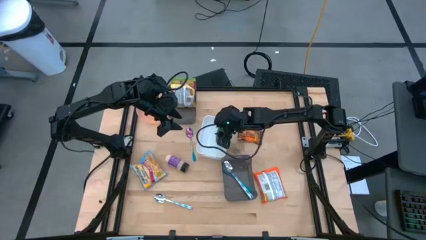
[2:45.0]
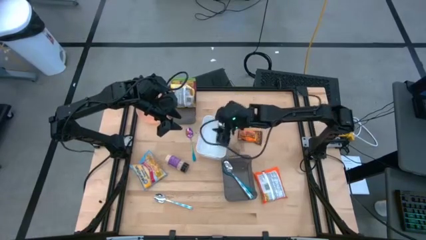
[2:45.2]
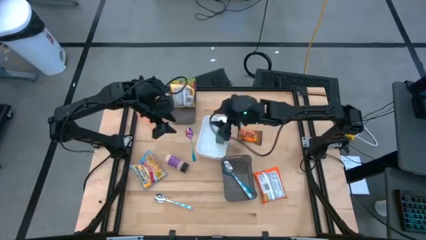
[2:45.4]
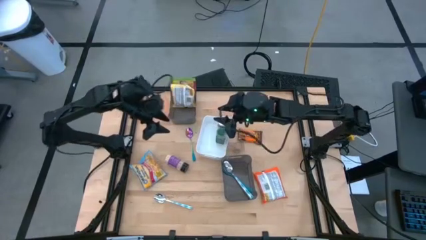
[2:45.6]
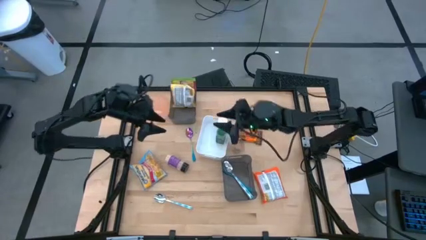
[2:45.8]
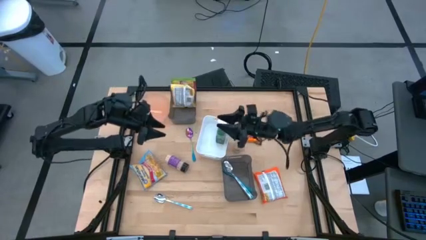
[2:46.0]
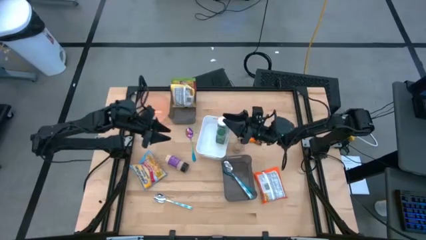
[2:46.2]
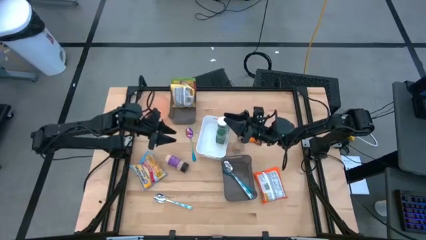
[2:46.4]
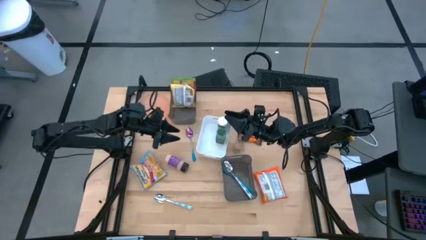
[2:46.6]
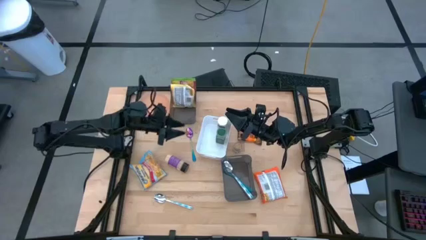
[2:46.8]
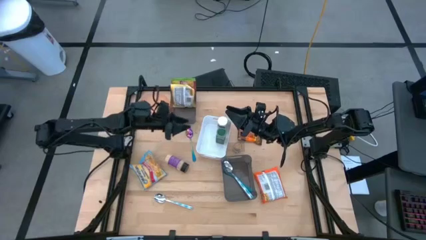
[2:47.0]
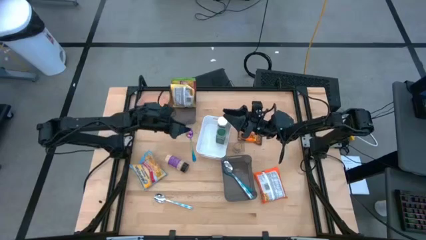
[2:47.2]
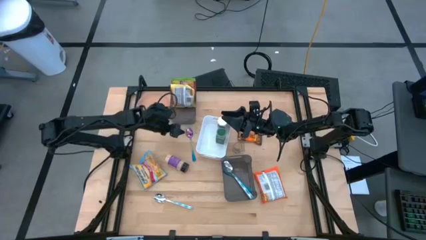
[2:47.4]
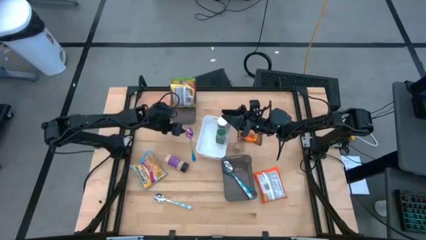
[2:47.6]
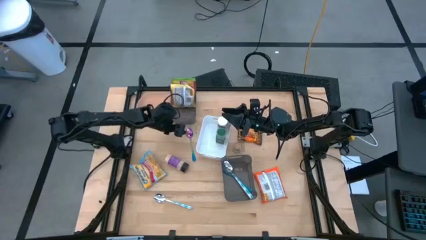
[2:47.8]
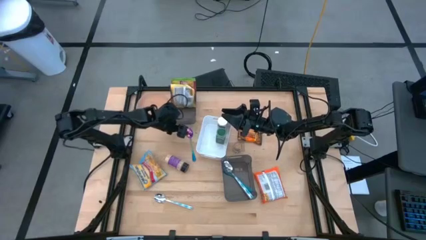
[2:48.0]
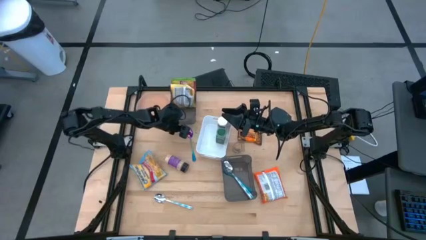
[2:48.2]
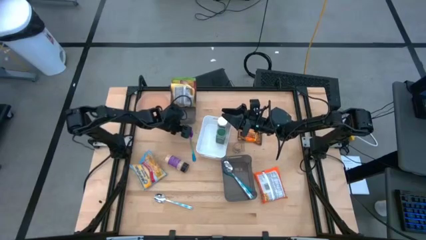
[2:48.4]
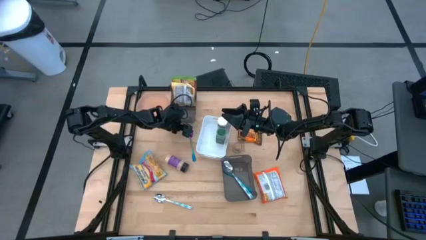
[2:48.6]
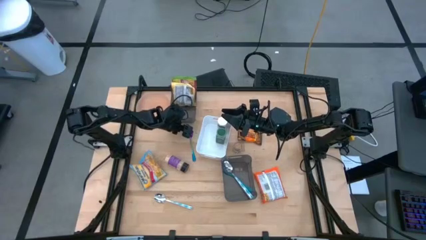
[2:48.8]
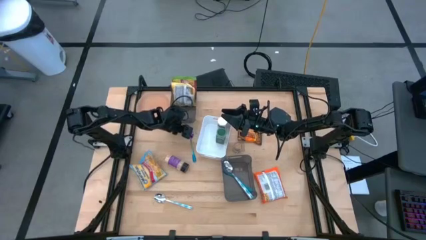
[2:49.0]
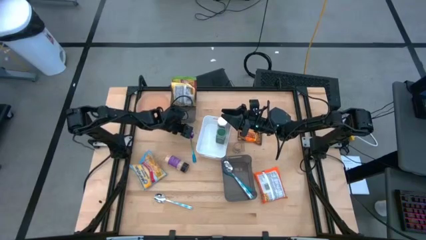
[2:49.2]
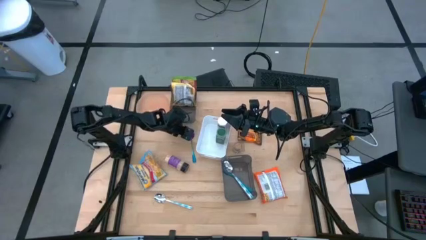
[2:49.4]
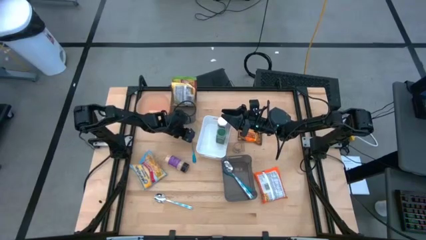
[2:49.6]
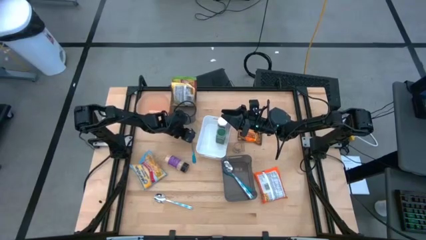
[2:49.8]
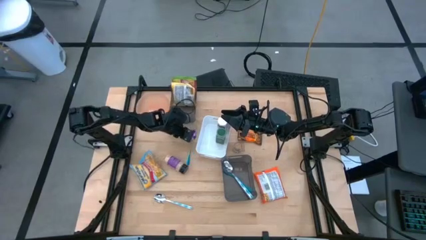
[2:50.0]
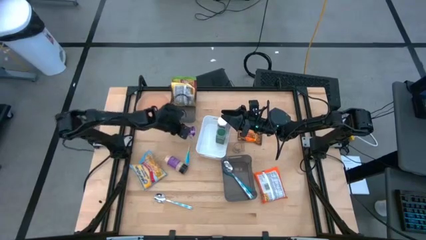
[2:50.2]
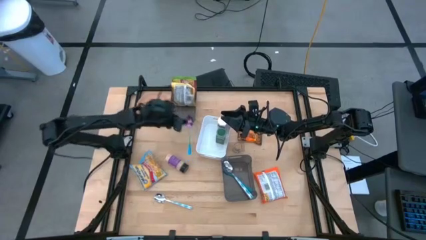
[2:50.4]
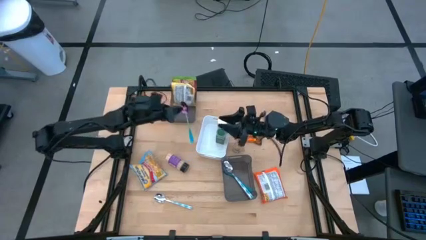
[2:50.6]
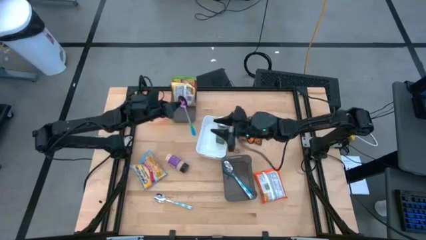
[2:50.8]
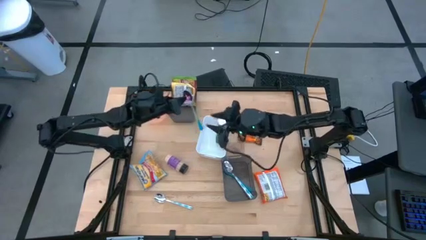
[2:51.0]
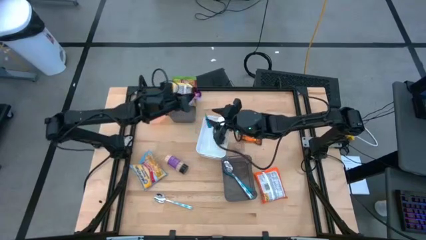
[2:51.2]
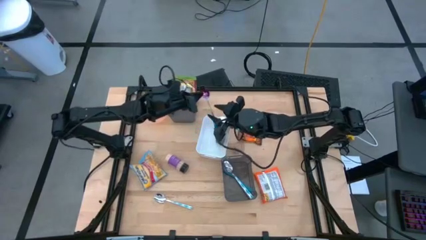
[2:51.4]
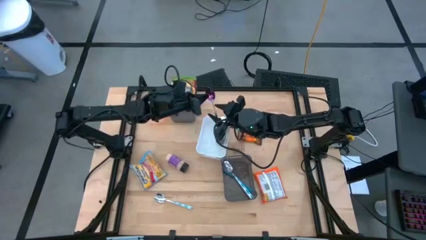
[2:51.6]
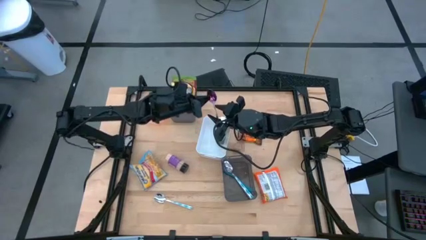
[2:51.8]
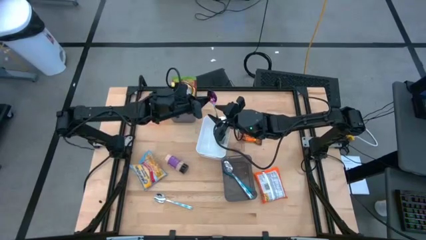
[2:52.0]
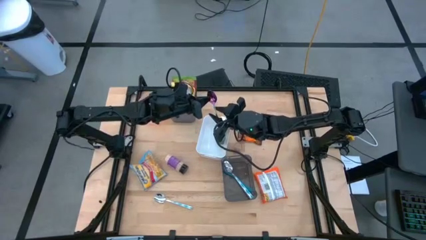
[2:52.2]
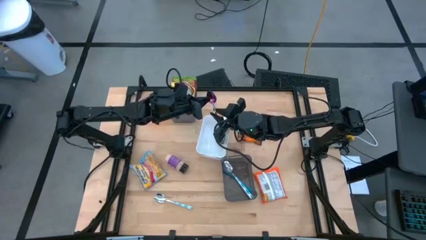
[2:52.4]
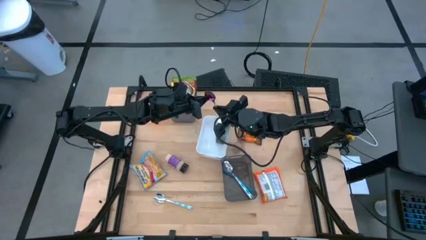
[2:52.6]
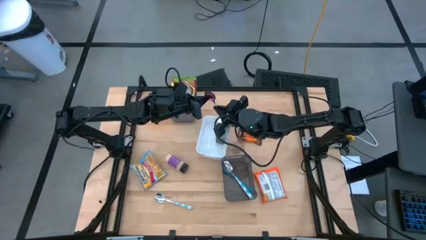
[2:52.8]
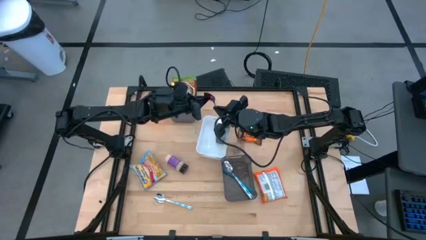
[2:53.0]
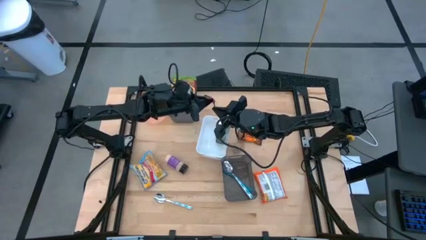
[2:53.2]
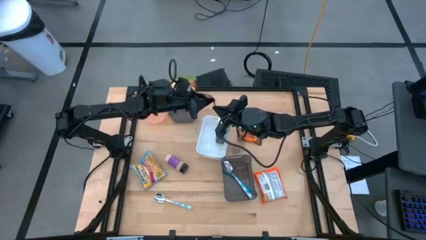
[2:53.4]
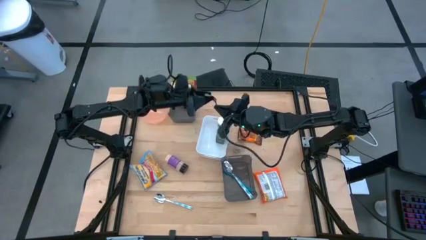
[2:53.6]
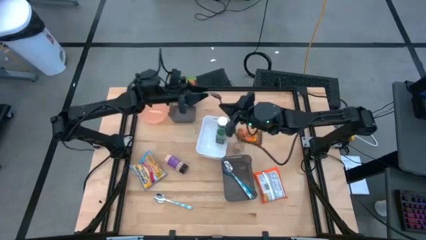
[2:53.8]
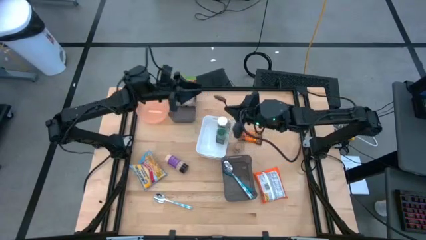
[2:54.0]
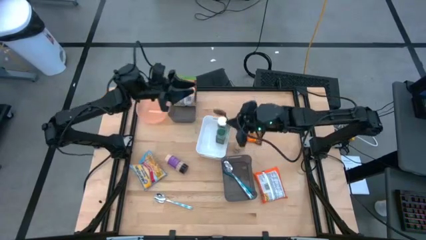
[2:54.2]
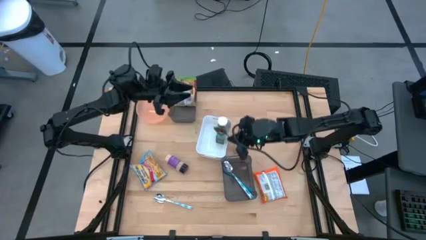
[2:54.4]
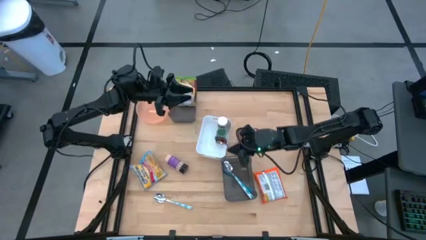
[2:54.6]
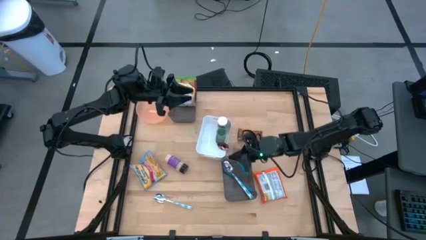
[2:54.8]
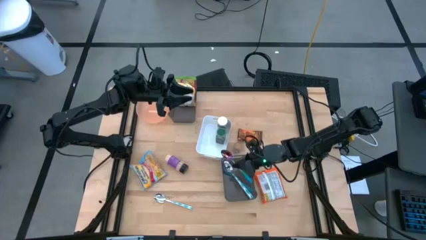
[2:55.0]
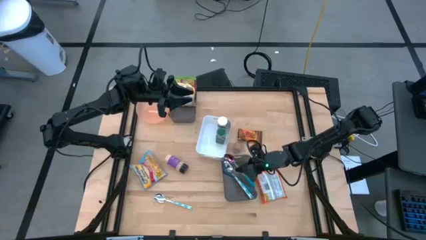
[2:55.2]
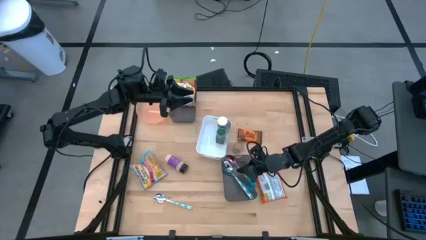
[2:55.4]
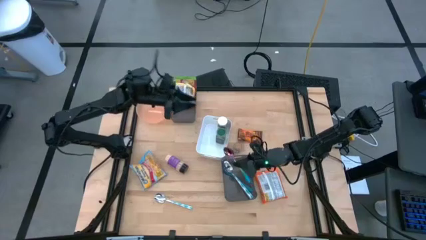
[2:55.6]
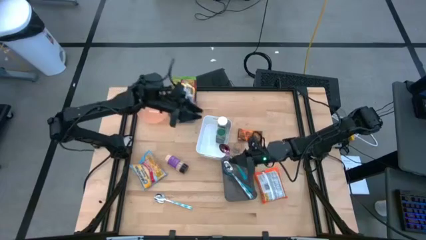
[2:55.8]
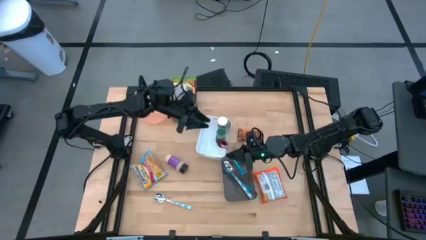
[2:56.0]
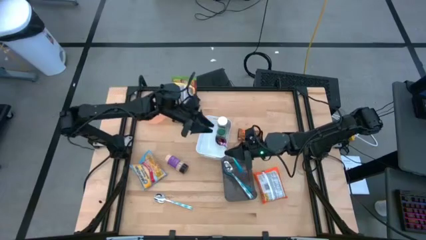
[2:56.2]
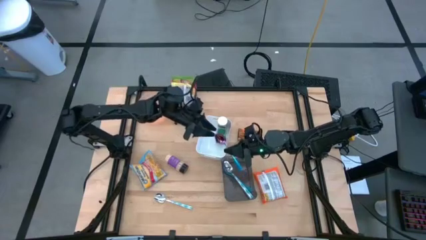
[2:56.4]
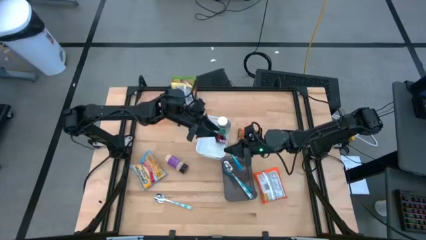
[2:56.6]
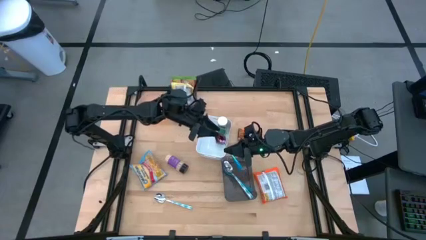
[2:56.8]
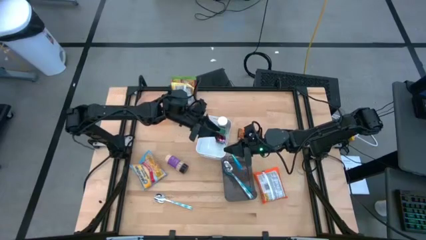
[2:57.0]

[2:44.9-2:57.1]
Task: Pick & Place Food Item
Put the purple and green spoon into the bottom black bin

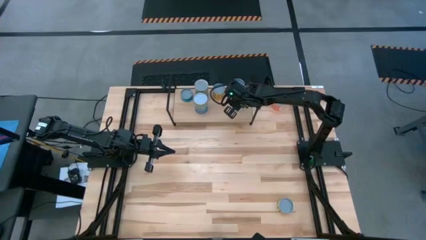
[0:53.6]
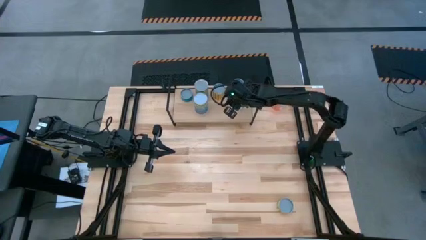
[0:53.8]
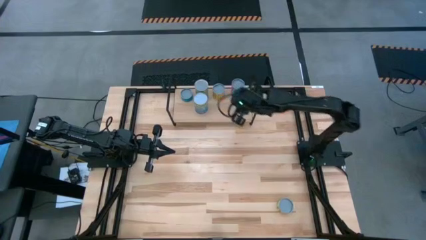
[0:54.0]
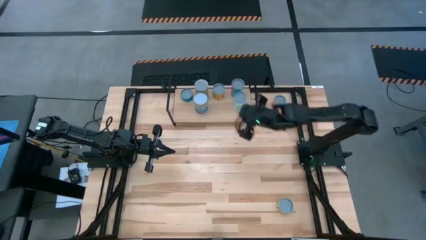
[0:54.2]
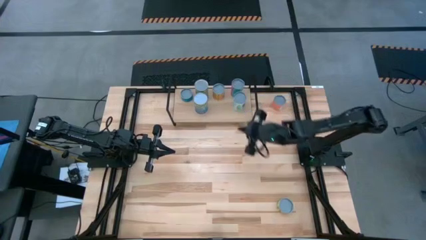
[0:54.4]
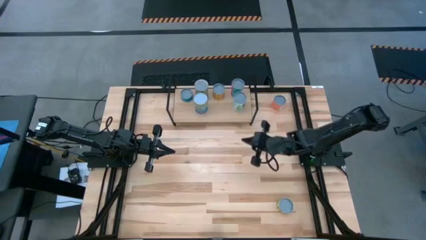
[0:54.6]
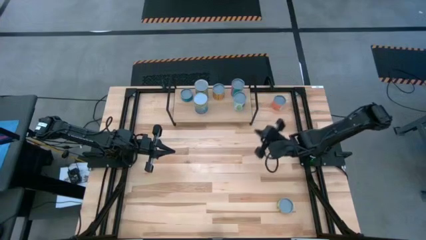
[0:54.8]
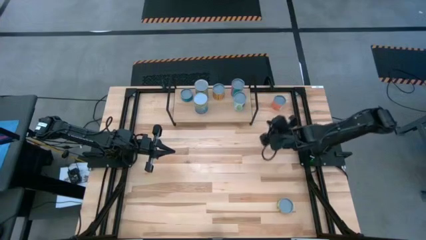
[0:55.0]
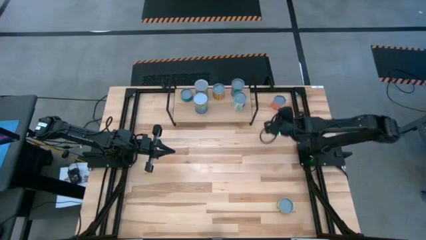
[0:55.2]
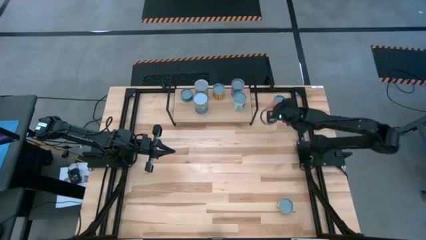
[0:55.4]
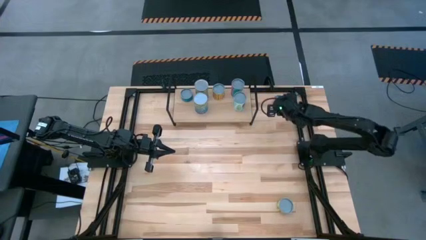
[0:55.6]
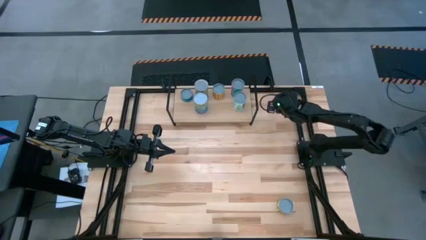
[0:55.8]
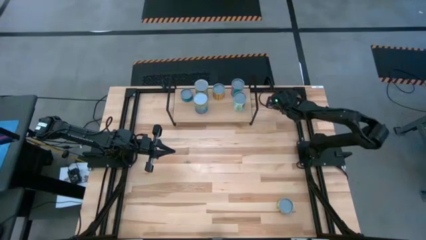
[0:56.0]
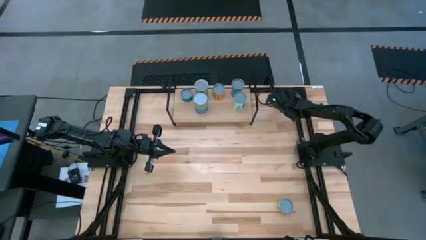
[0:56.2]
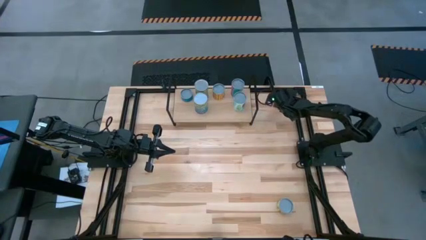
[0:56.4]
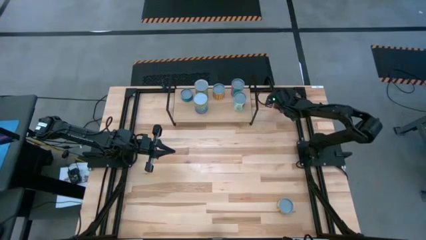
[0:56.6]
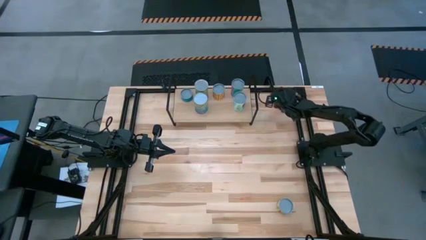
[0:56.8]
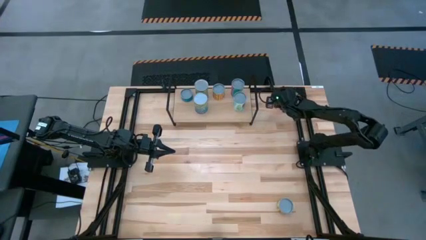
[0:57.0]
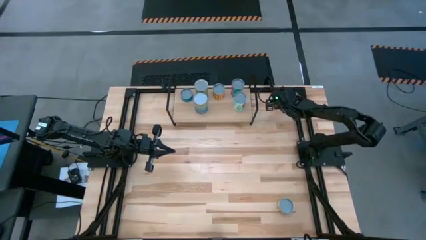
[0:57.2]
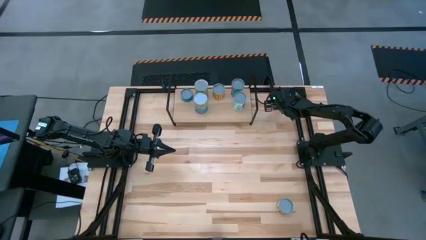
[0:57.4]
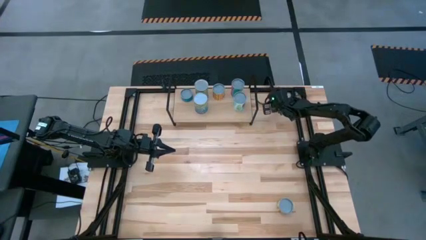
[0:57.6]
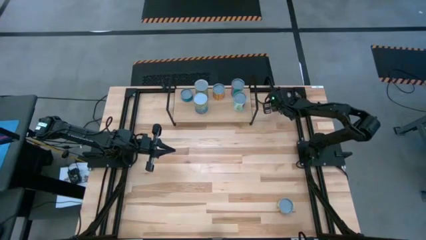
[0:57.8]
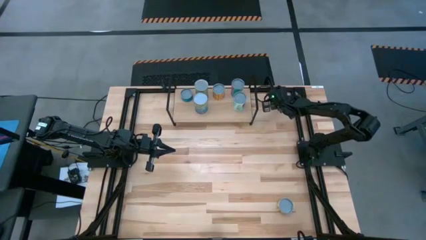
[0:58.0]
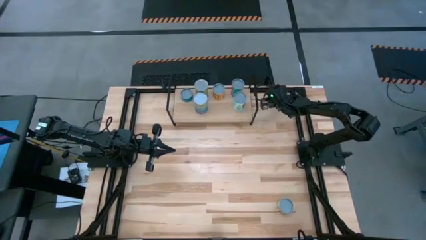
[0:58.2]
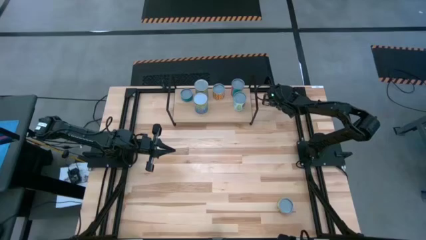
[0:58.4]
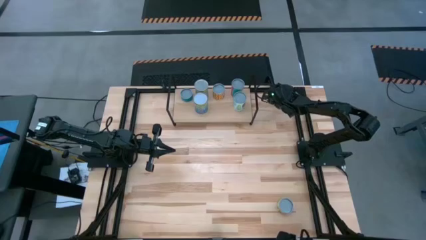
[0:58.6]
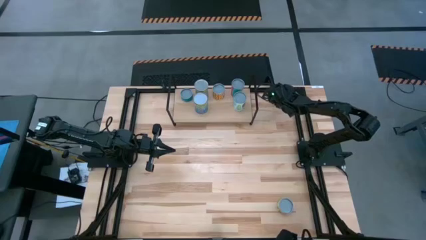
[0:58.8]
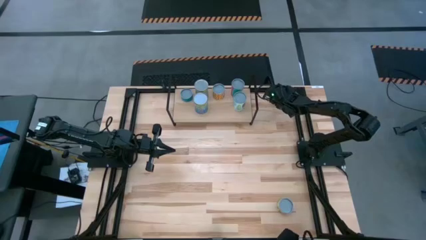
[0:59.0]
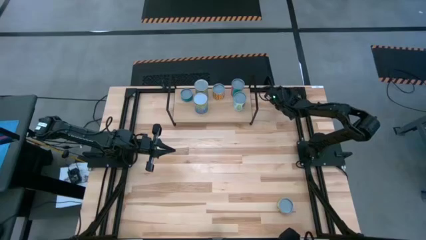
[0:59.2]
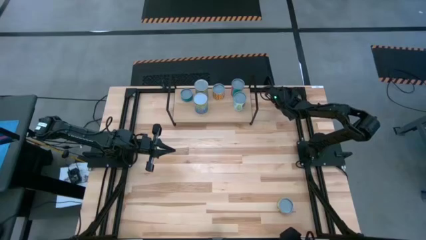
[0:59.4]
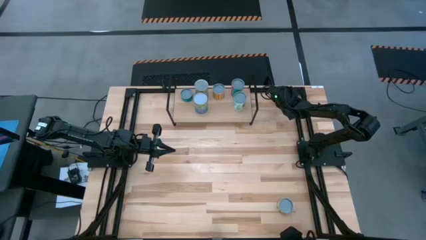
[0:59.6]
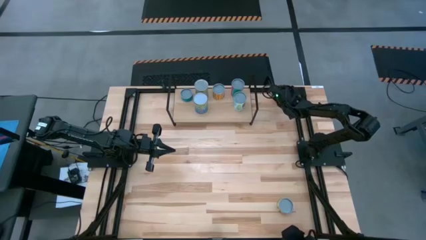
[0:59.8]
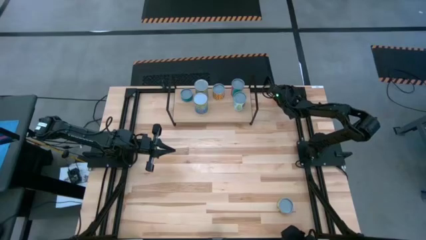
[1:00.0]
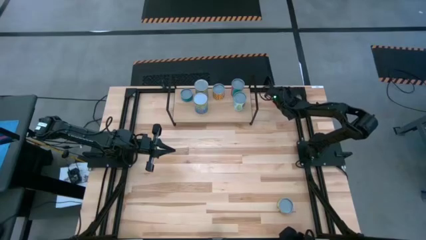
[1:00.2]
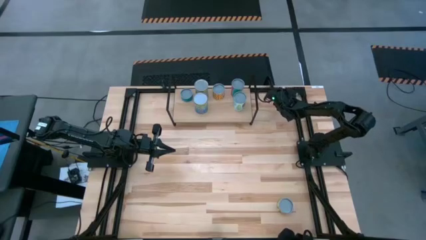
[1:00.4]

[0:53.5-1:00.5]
Task: Pick and place cans onto a shelf
Put the canned meatballs on the shelf
